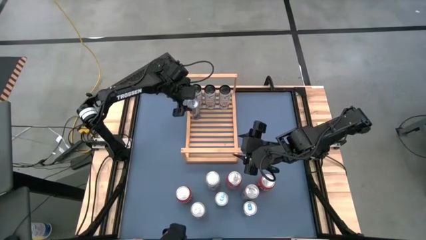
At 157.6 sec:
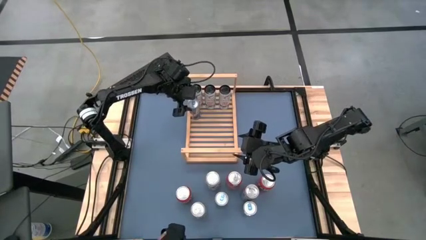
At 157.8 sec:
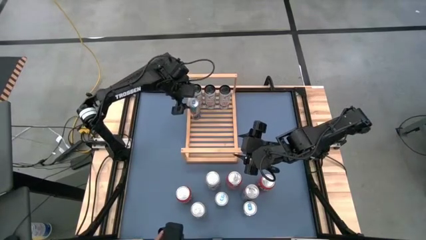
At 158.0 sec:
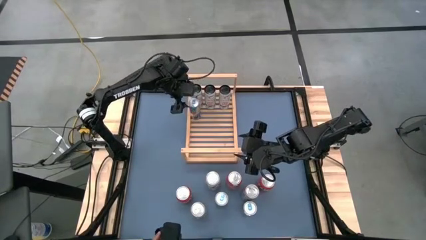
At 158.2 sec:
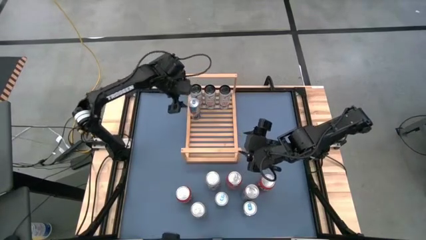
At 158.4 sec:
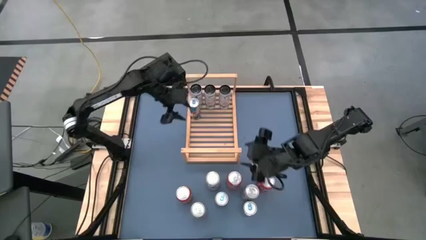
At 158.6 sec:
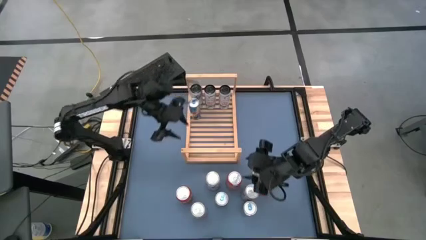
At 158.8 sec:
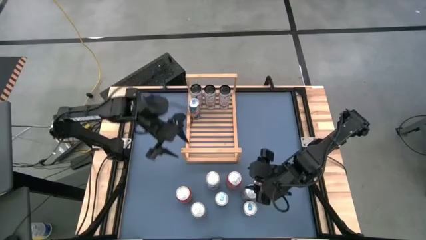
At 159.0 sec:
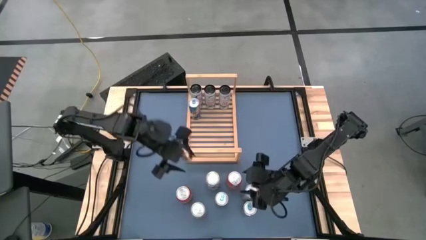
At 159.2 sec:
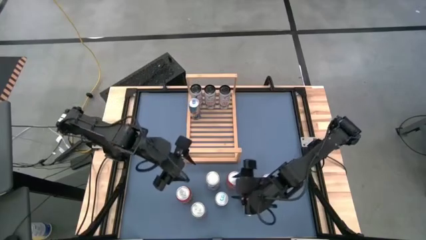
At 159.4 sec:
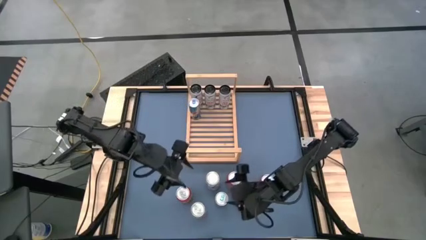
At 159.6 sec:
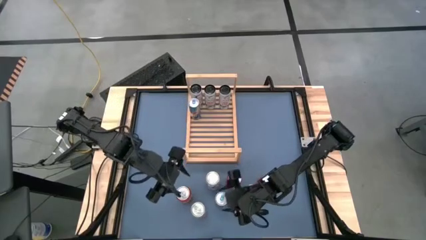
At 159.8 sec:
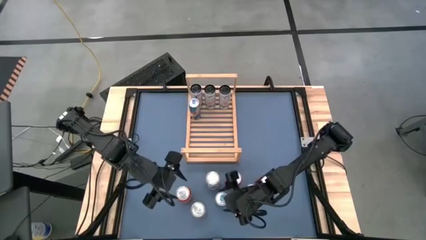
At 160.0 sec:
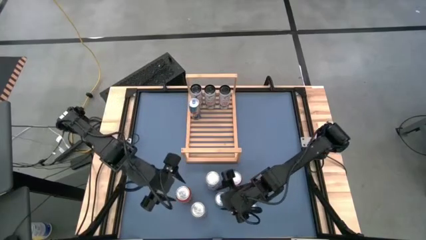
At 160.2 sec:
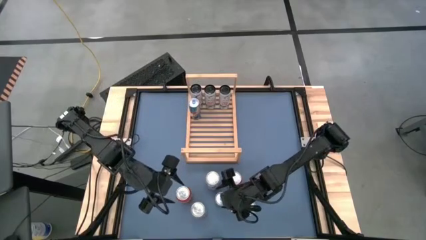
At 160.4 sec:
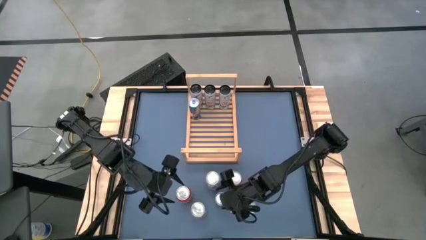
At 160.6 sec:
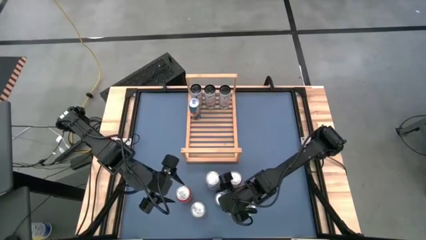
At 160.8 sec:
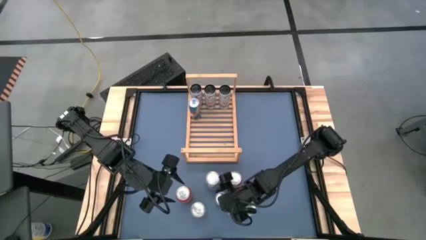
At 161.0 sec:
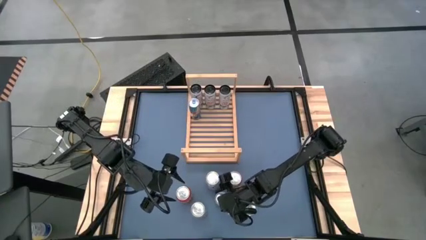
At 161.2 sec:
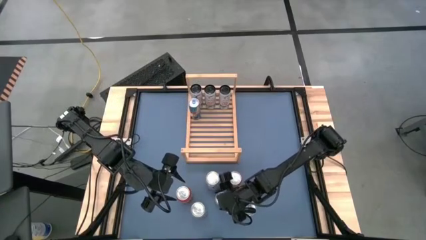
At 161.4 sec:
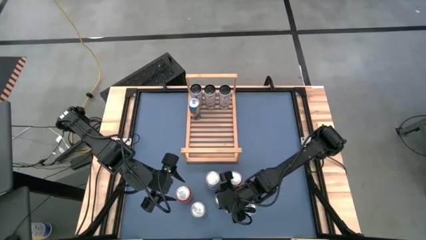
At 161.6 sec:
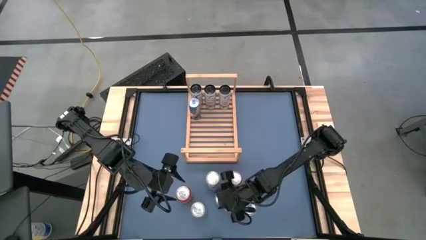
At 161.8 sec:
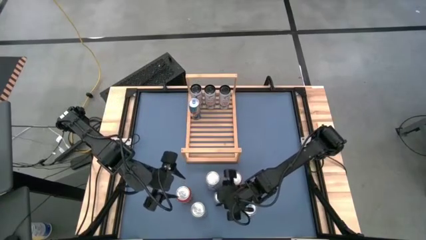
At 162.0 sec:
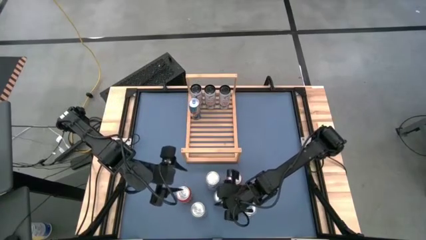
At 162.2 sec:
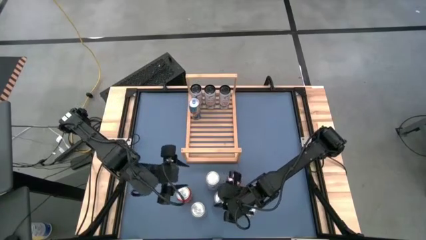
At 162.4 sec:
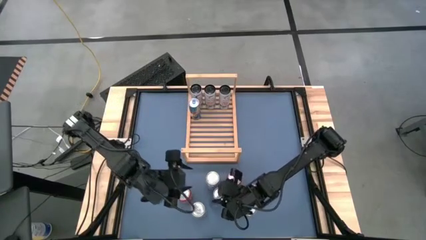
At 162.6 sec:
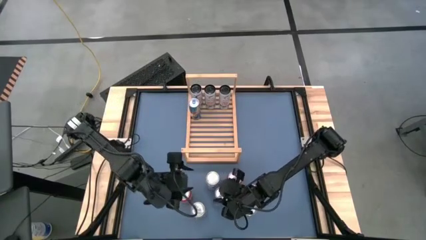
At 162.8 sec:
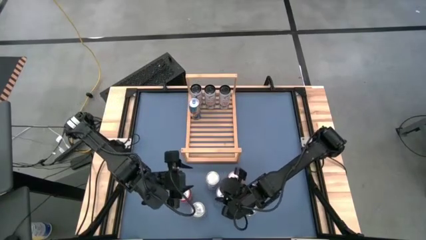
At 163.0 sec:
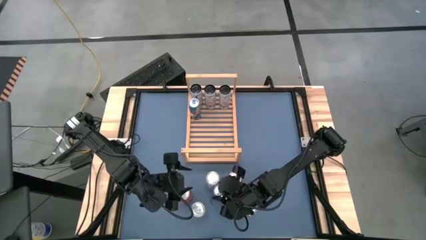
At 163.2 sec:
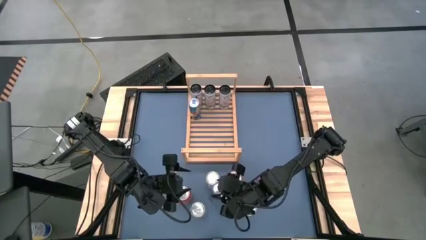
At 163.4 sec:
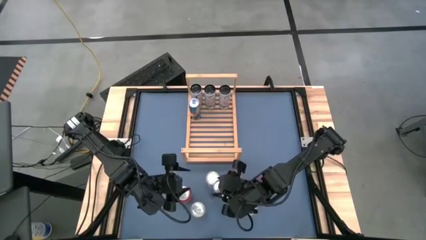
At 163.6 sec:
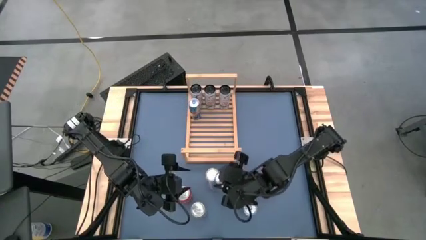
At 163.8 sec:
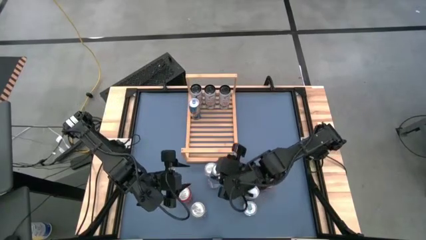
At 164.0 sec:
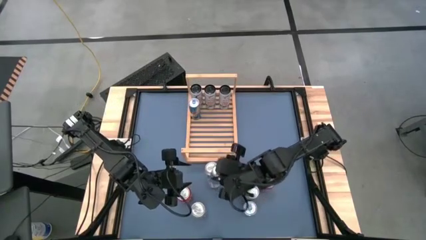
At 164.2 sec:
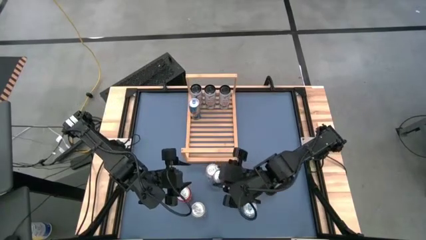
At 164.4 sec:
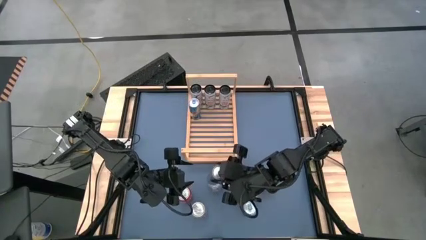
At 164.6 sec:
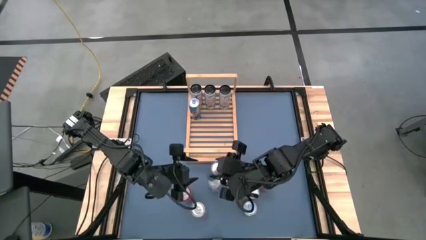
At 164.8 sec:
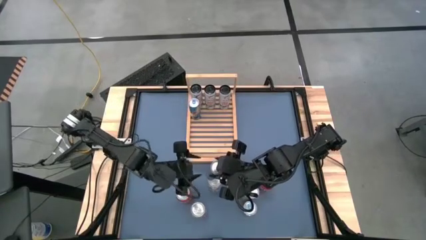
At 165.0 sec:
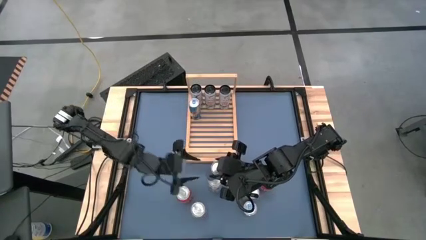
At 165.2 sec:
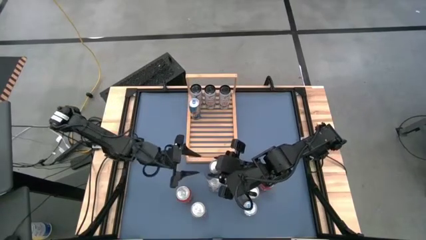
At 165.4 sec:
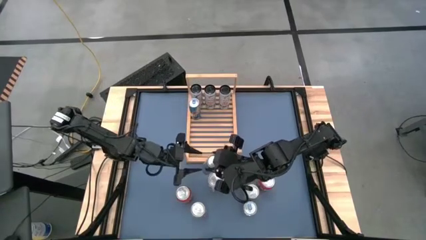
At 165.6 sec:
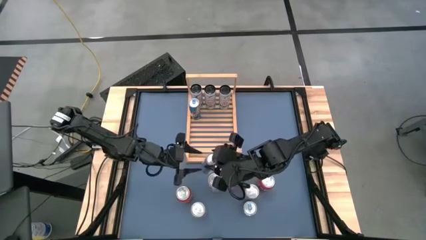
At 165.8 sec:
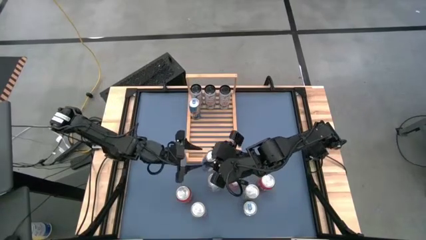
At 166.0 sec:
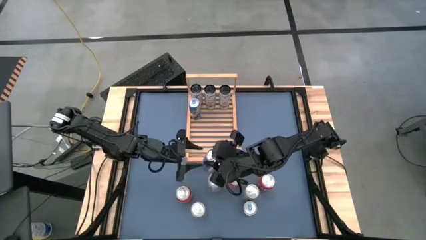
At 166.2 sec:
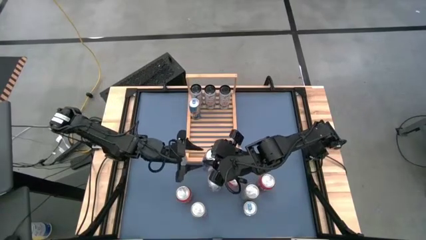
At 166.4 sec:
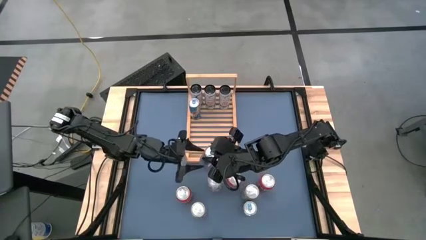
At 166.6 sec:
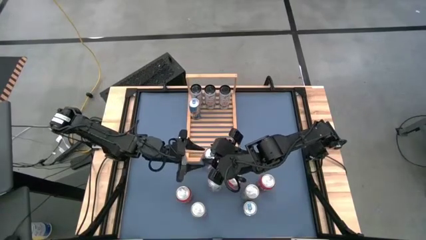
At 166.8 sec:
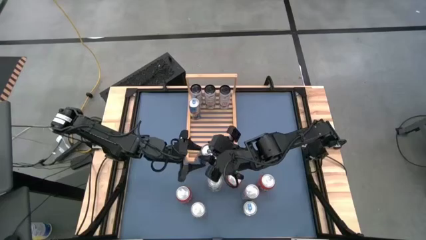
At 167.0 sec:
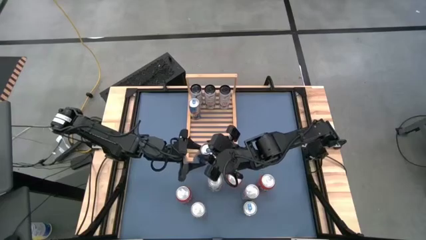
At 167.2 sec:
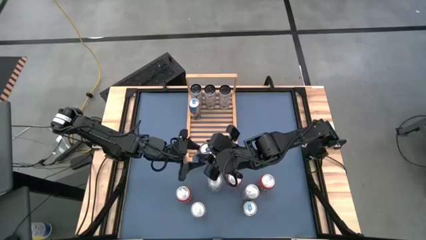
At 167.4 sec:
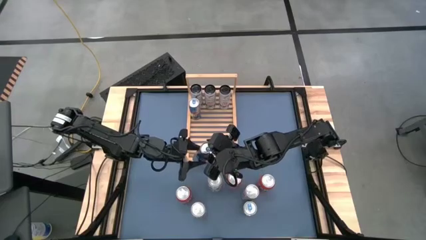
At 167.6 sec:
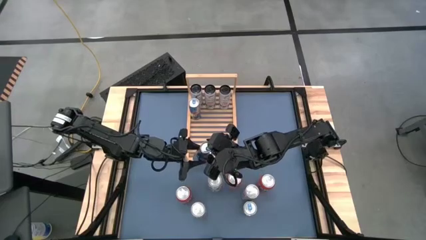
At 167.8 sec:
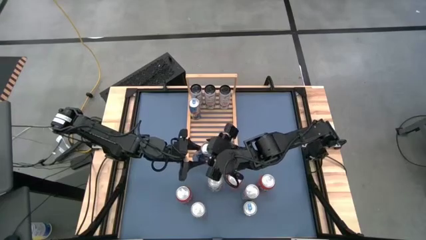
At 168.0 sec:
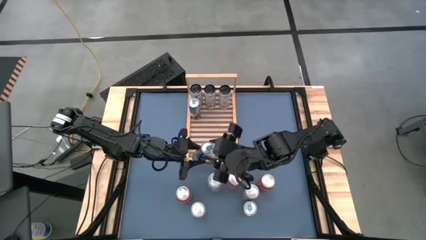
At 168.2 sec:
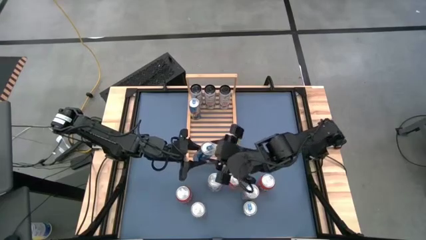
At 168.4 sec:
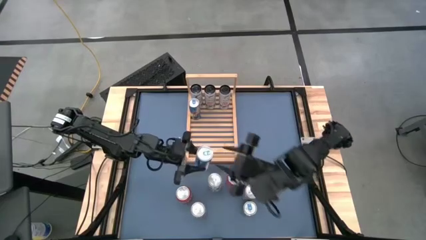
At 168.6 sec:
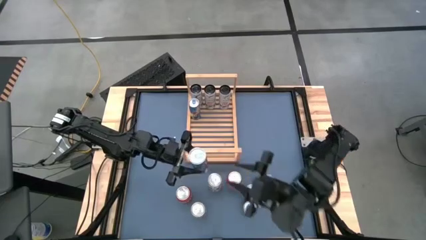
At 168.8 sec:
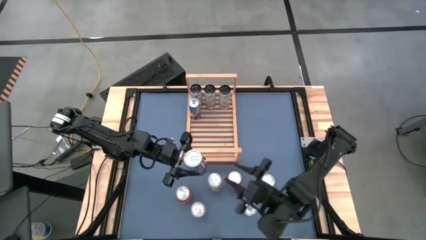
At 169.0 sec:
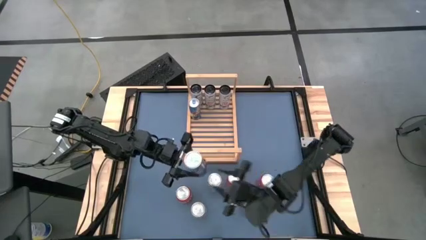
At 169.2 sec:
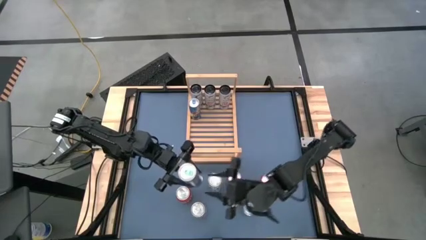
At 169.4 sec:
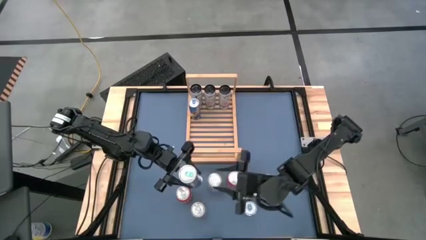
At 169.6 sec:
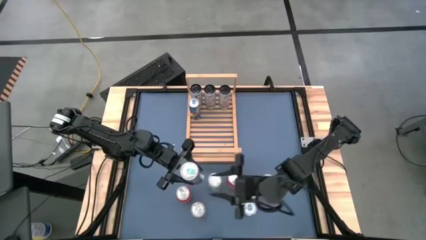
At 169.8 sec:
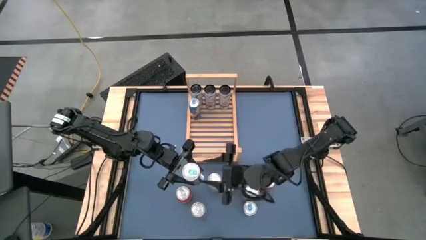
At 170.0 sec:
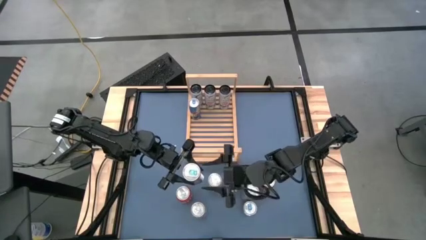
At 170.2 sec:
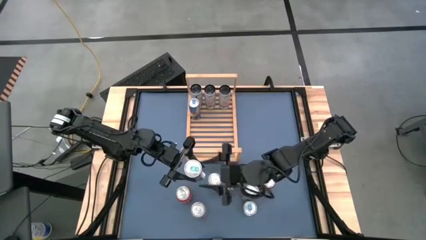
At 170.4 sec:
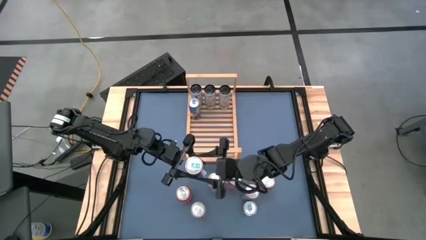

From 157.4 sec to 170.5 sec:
Task: Place canned beverage on shelf
Put the left blue soda can on the shelf aligned with the other blue soda can

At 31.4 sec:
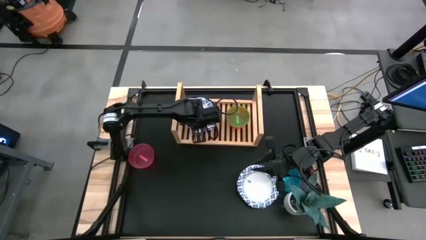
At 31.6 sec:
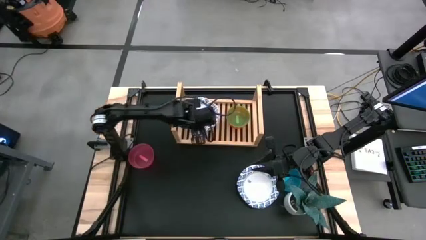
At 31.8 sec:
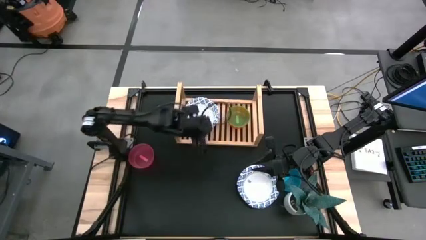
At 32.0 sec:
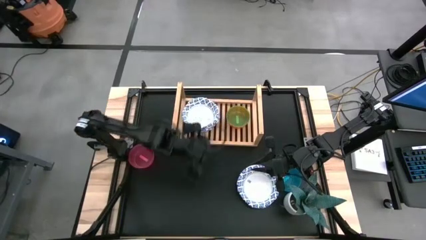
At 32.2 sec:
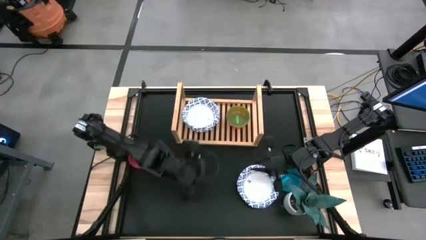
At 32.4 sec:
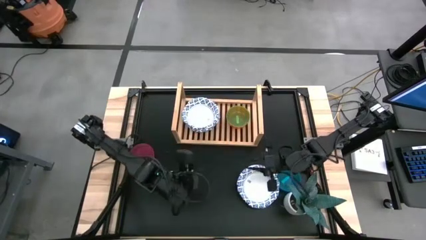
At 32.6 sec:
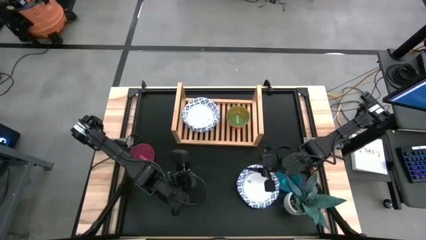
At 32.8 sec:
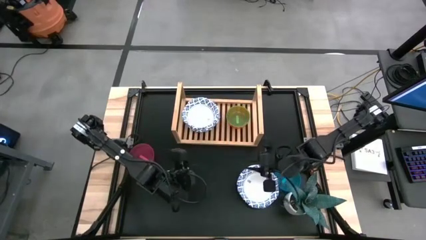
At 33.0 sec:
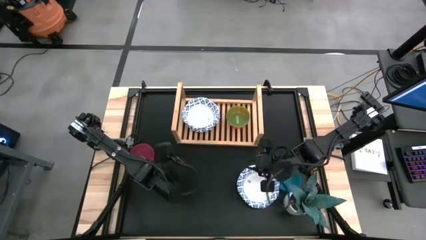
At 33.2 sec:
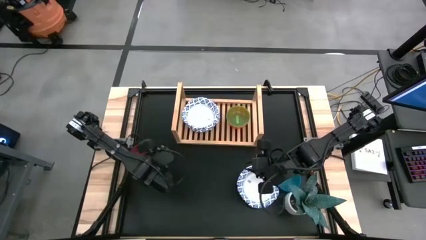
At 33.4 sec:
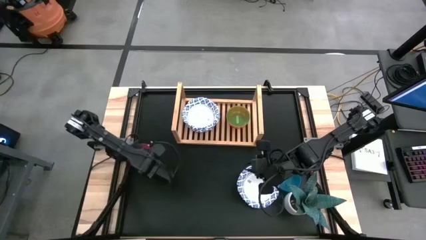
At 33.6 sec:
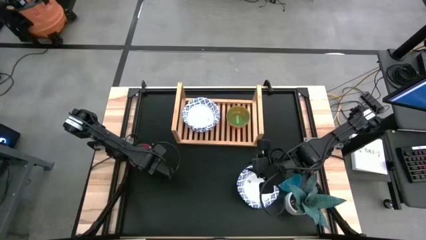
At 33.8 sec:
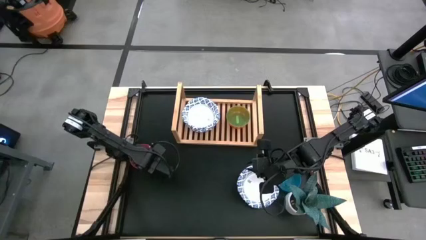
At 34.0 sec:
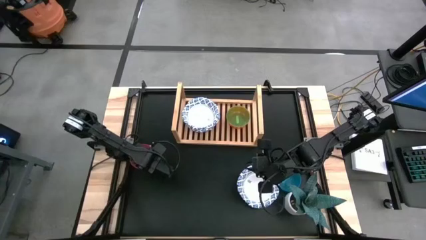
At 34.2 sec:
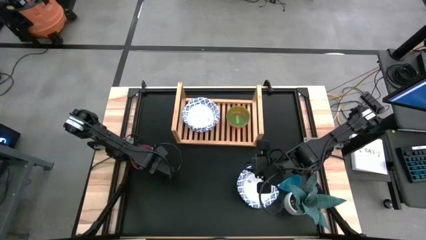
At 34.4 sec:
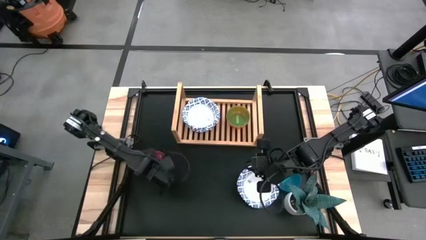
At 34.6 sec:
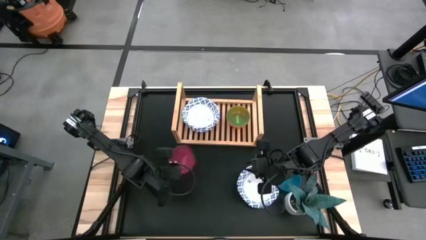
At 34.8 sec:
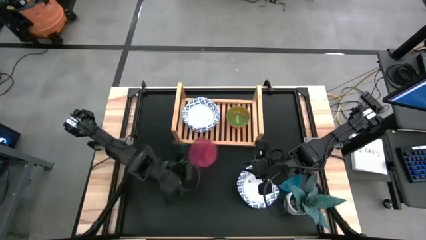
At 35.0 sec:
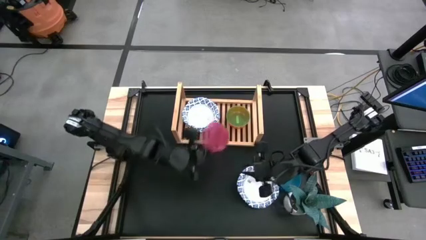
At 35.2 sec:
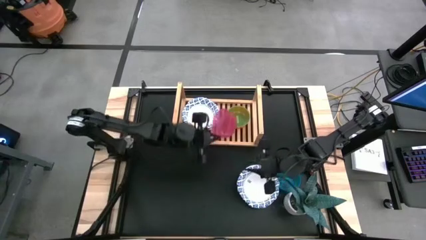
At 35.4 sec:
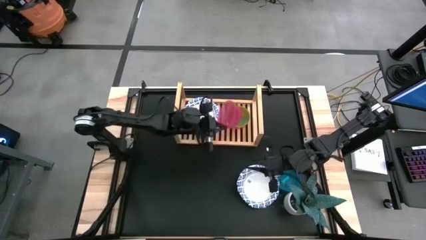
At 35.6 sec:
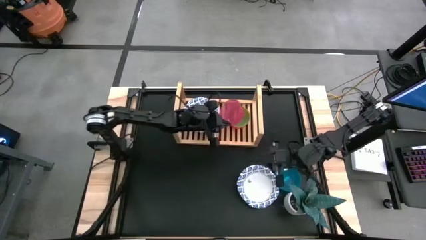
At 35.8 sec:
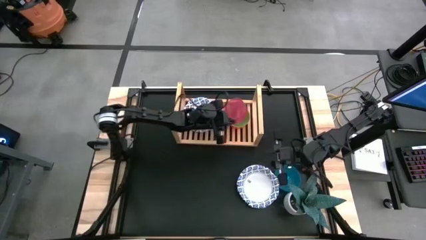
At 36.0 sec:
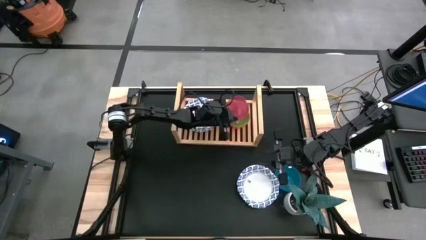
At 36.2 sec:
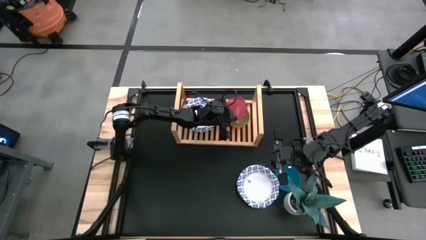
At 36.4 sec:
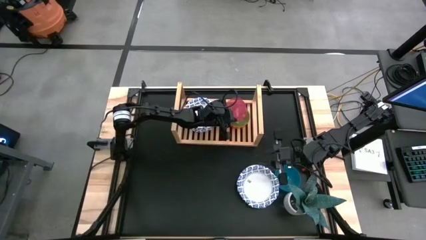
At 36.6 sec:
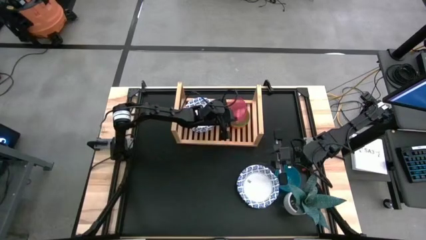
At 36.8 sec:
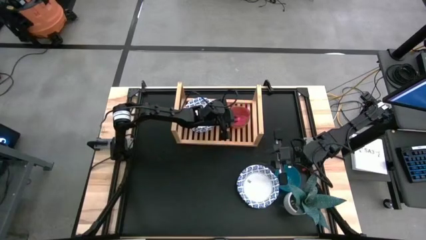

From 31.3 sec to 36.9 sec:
Task: Place and stack bowls onto a shelf
Stack the small pink bowl on top of the small green bowl on the shelf
